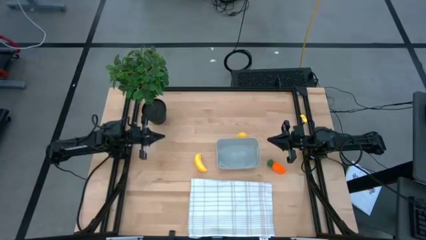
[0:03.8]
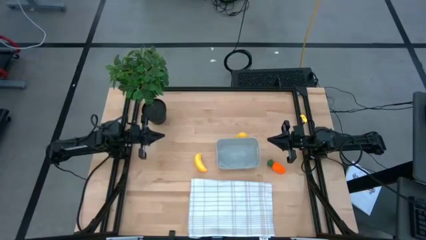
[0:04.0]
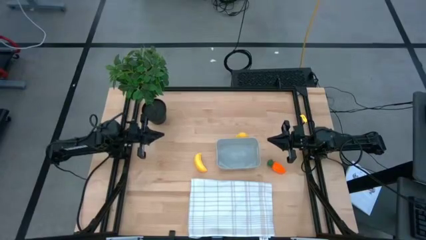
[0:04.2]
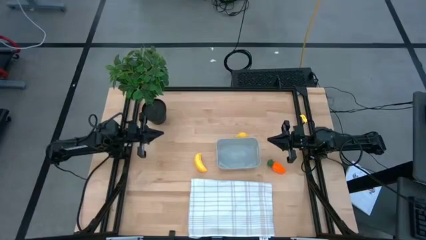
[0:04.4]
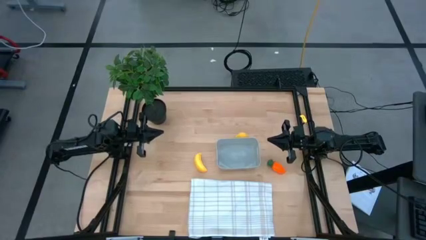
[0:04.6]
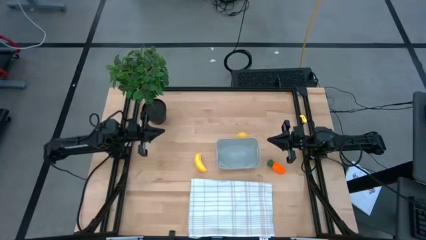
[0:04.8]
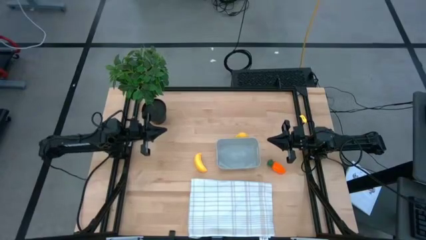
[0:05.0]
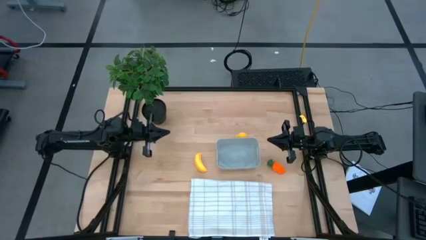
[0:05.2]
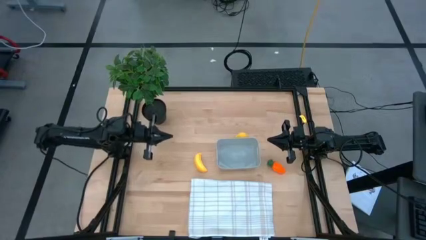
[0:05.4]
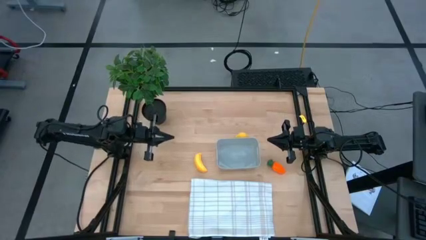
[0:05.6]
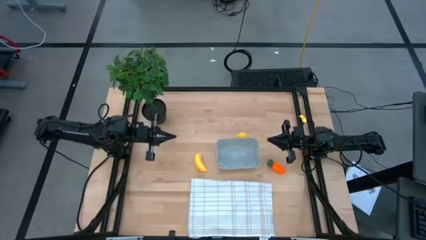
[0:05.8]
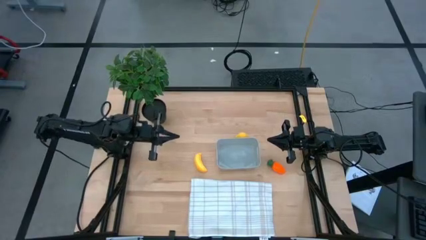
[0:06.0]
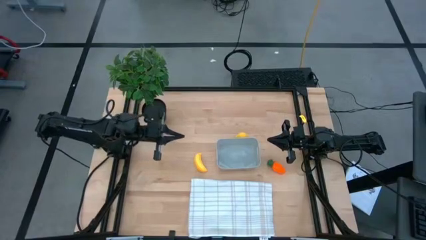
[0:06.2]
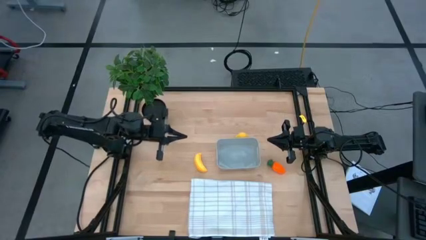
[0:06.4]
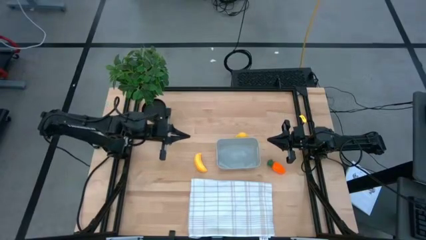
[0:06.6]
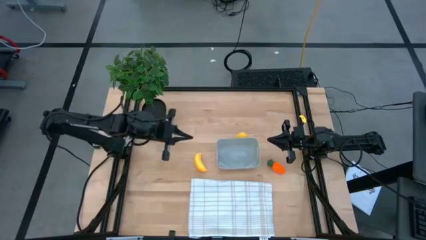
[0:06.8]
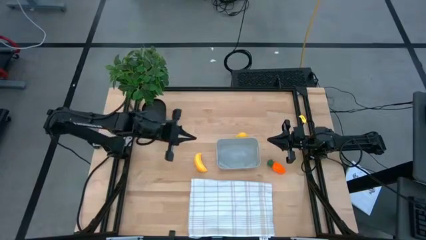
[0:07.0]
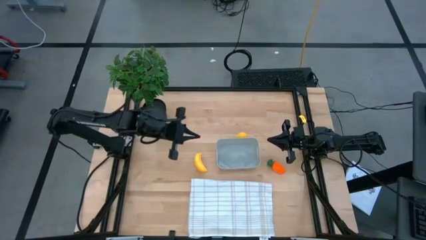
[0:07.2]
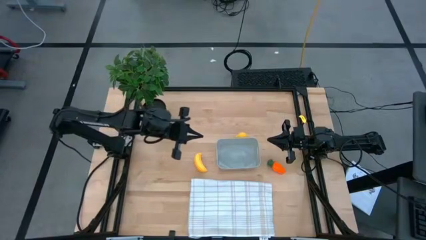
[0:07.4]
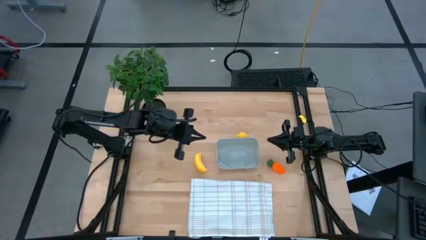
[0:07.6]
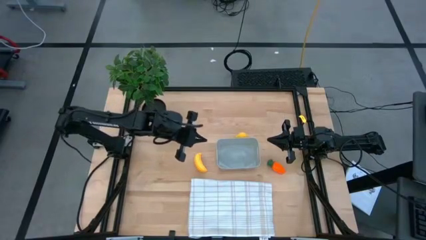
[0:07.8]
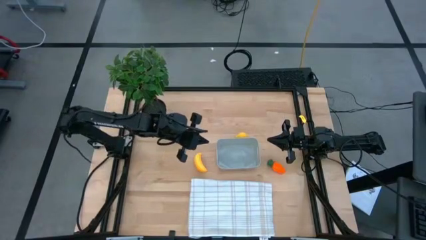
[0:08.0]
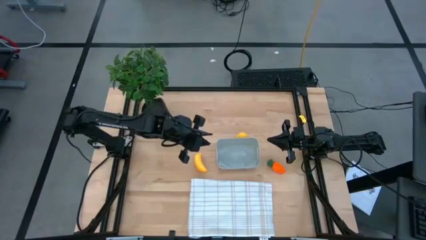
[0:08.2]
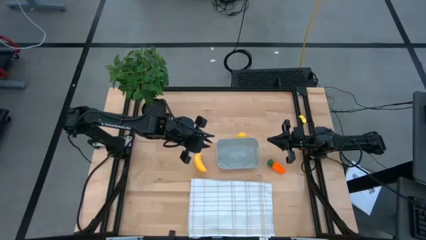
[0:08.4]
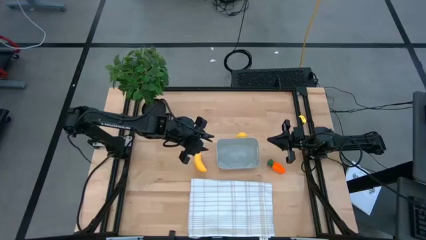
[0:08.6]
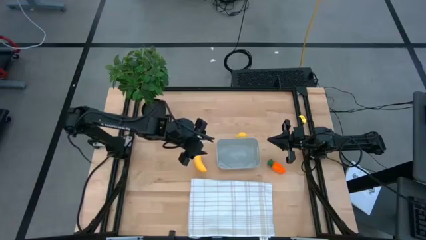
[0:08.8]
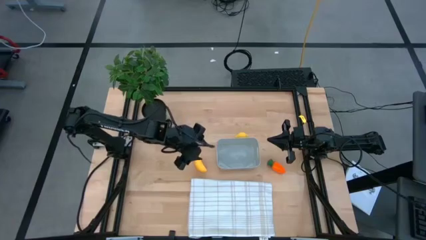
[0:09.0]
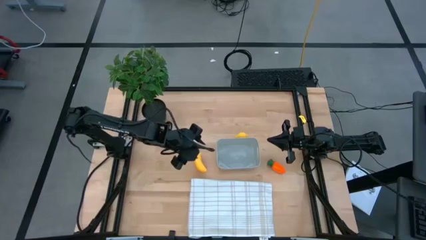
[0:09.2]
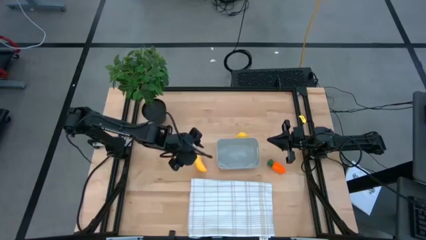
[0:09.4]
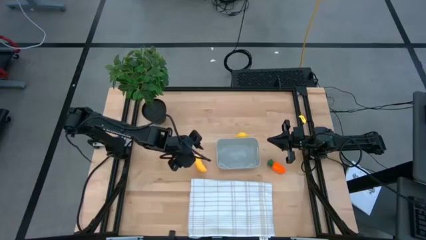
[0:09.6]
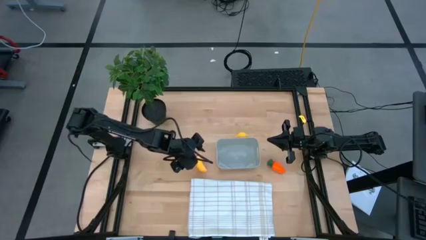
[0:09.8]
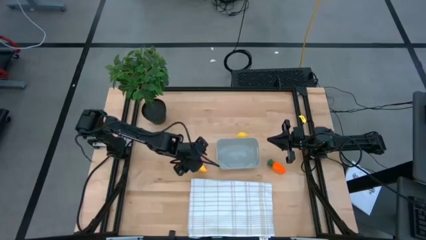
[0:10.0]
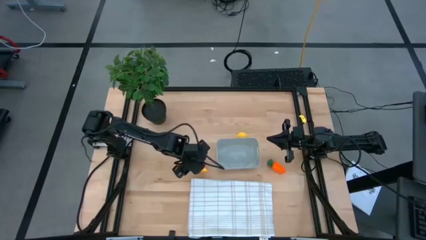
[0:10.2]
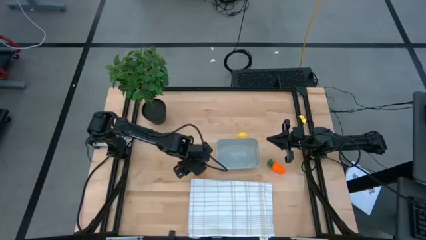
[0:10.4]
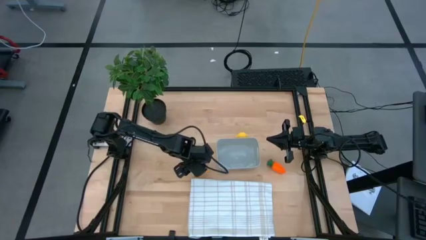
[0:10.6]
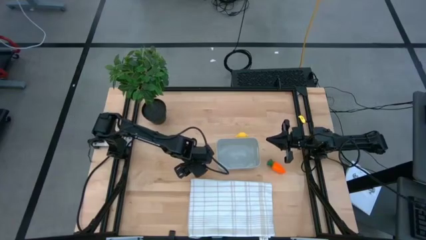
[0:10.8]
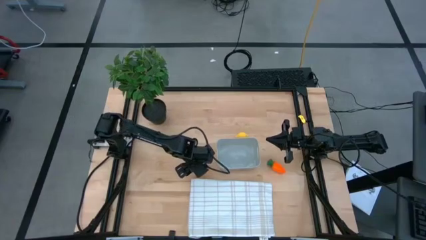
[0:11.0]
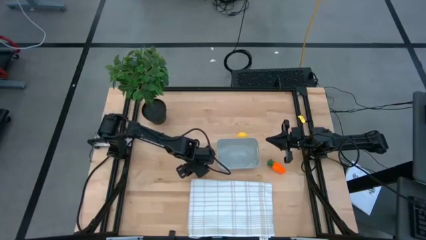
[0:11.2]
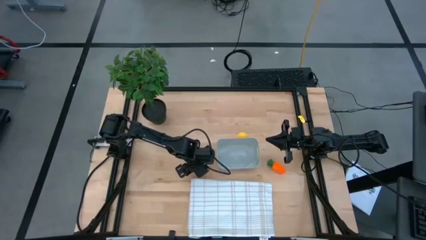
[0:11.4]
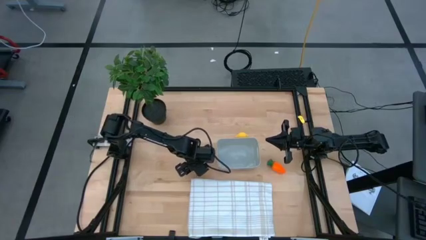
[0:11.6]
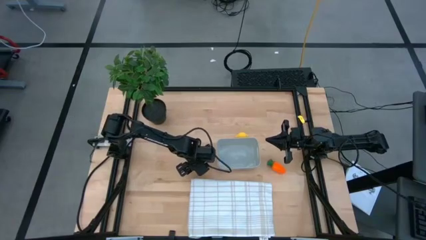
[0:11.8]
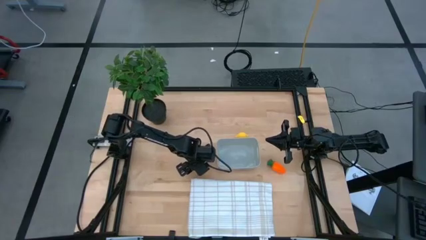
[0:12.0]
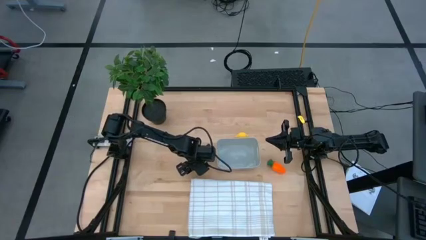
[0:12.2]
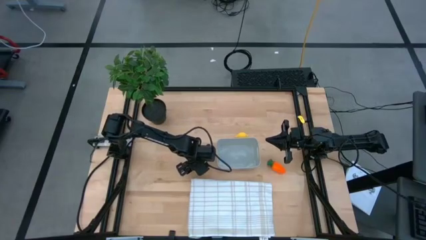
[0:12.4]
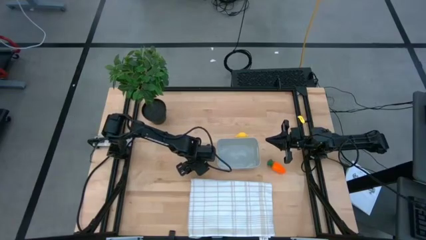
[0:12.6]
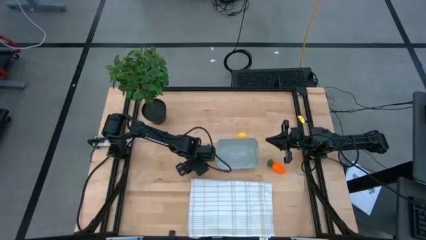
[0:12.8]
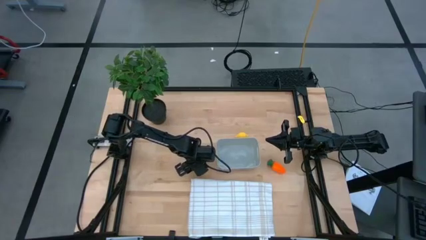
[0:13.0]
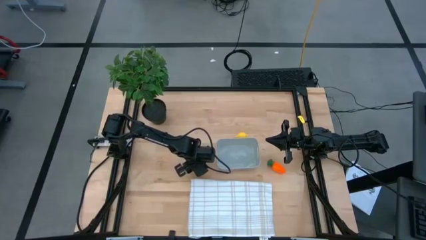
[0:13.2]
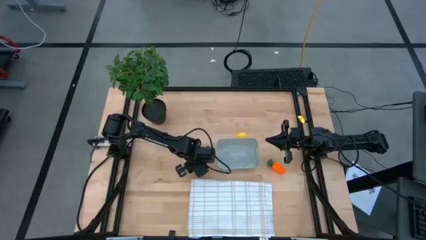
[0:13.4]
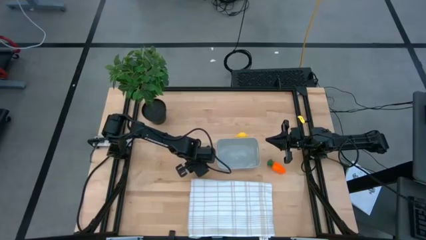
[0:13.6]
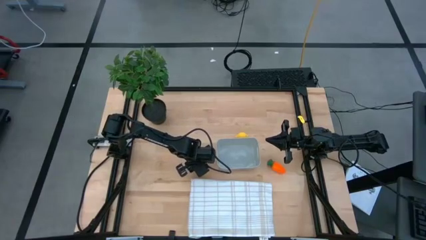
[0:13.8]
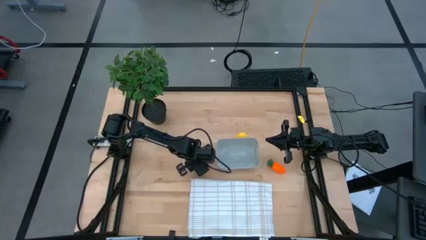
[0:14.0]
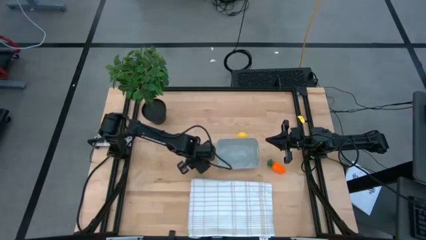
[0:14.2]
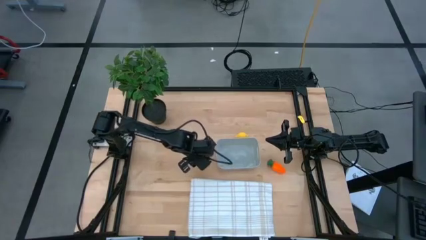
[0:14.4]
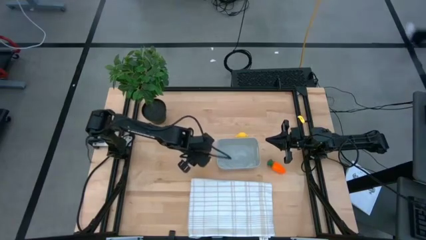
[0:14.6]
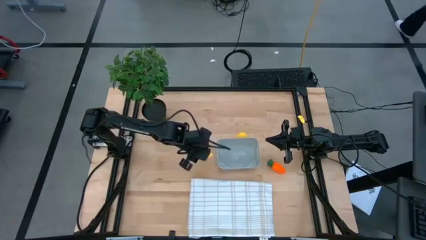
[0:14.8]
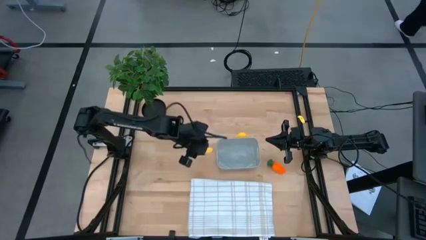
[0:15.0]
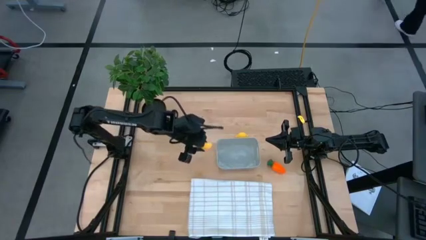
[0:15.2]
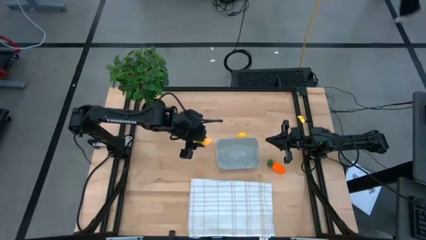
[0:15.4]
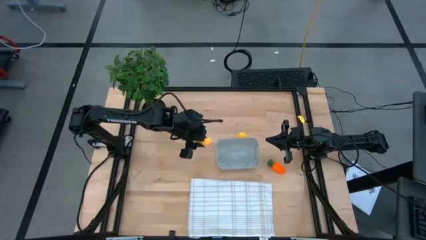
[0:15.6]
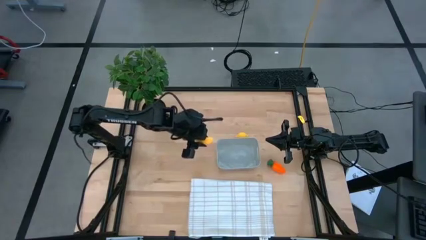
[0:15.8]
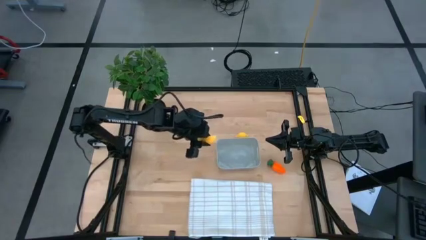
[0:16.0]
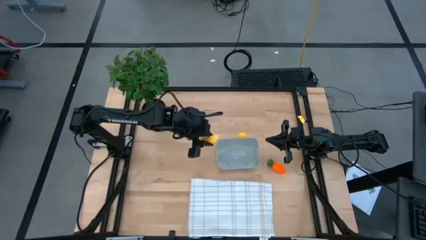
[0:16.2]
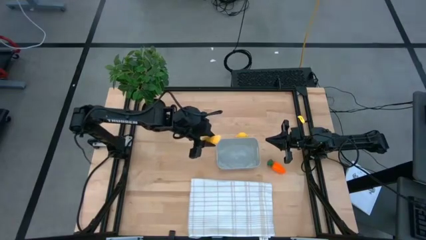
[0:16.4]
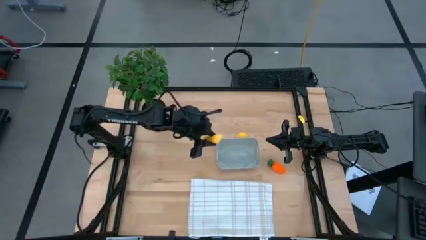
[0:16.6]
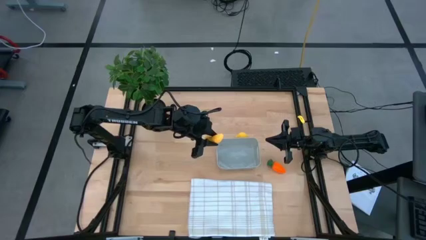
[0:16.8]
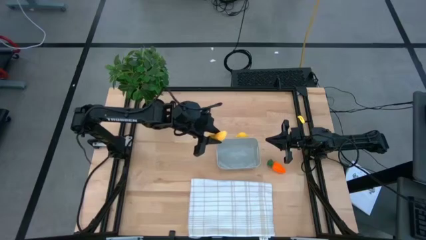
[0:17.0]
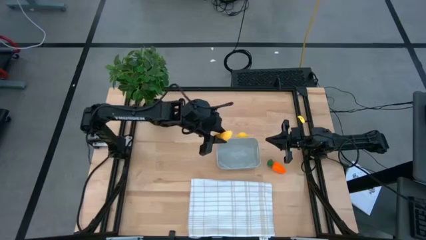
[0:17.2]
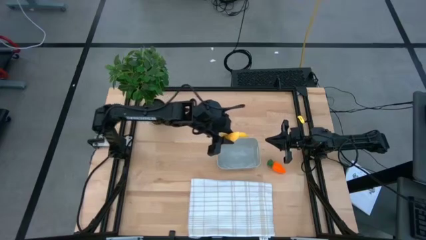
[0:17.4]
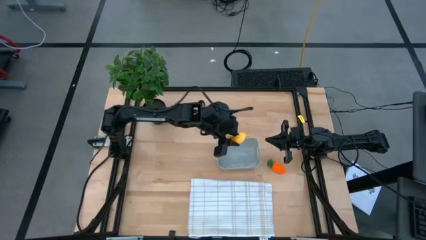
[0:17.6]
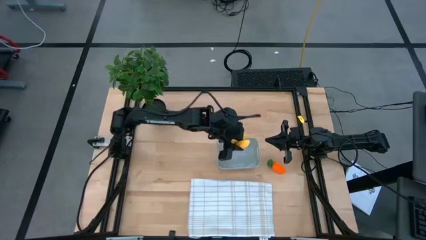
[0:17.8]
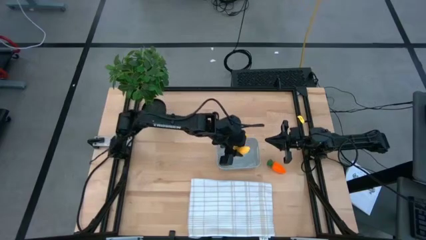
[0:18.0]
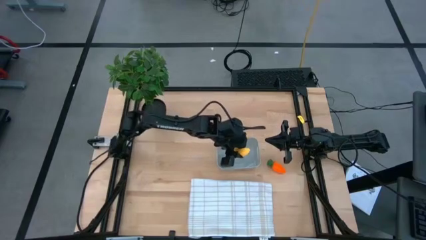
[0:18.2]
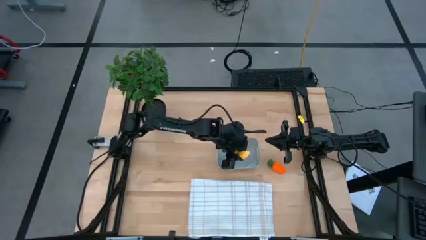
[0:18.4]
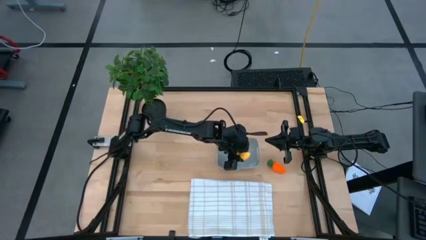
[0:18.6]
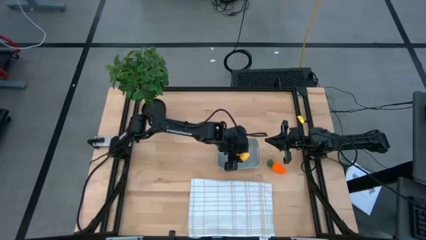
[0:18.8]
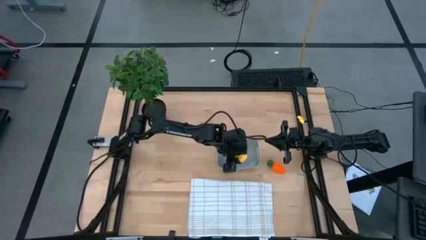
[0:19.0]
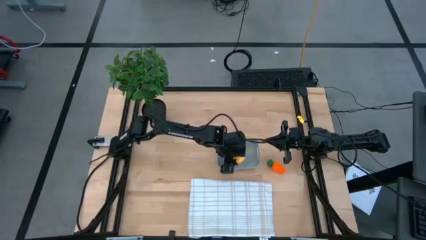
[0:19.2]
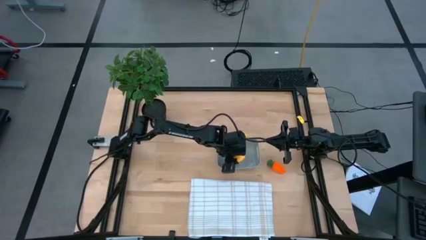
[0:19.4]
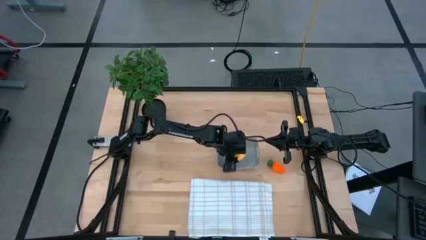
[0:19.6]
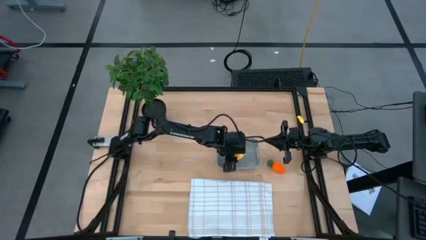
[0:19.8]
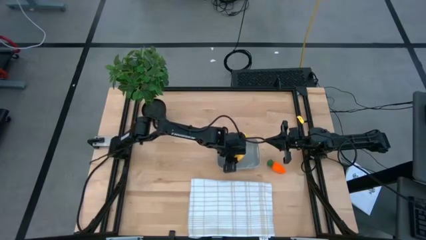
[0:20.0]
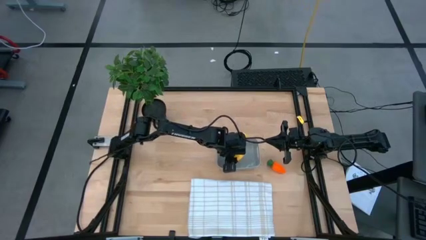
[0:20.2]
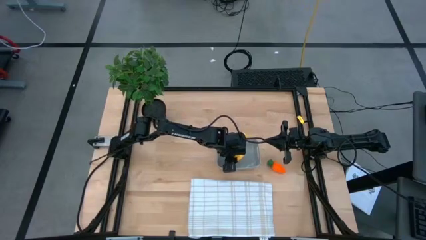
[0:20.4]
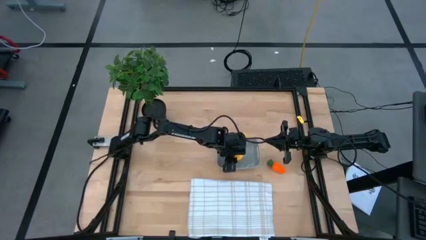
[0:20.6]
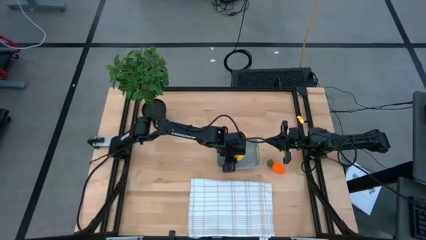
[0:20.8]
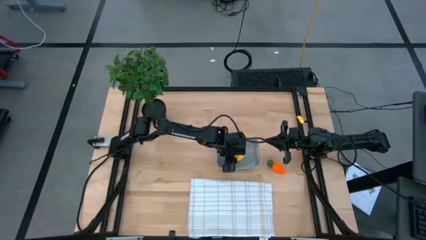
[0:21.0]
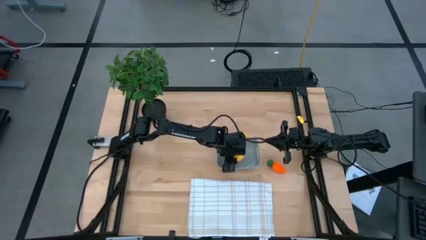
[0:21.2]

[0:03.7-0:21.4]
Task: Pick and placing Produce into tupperware
Put the yellow banana into the gray bin
